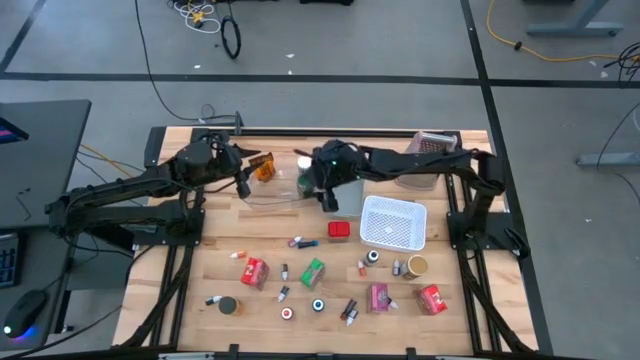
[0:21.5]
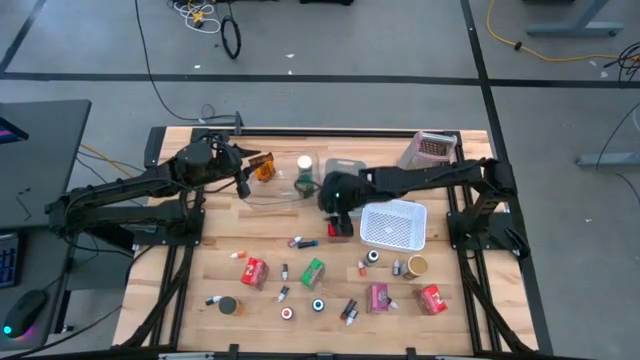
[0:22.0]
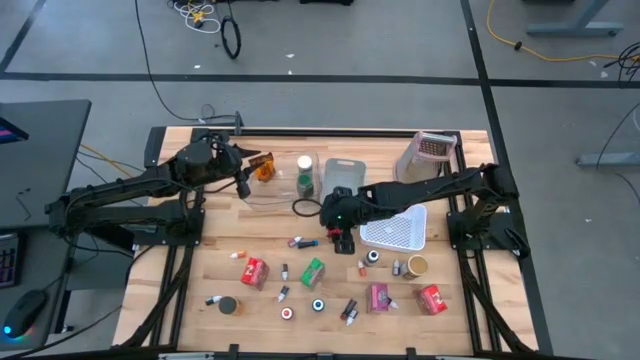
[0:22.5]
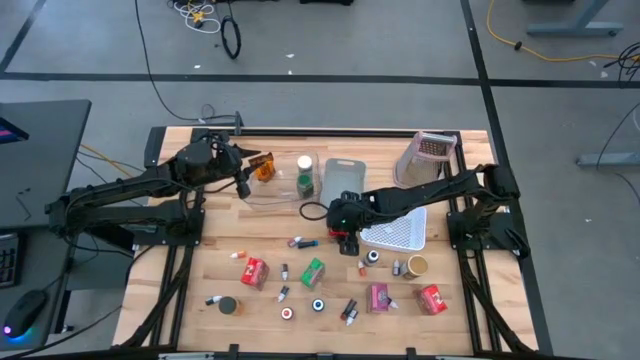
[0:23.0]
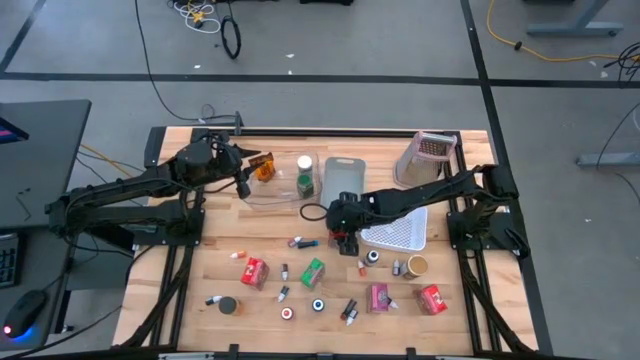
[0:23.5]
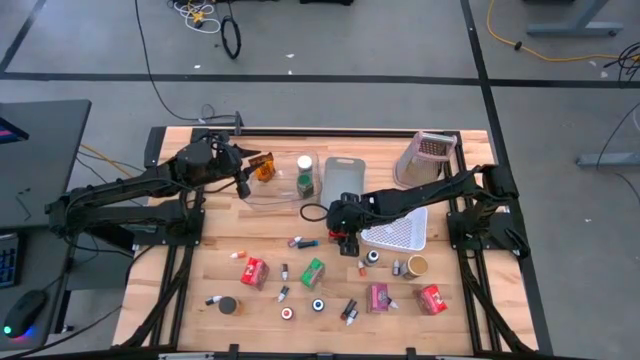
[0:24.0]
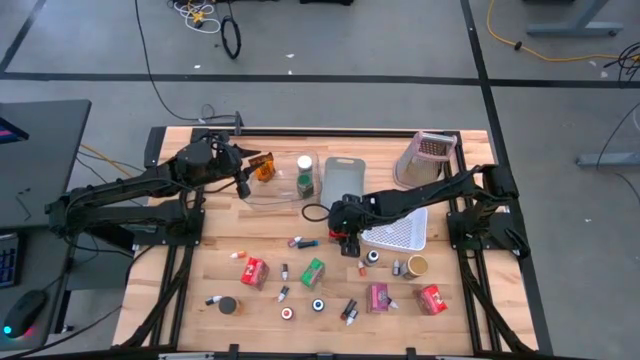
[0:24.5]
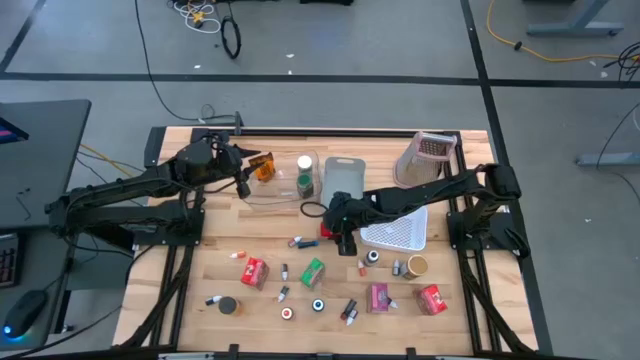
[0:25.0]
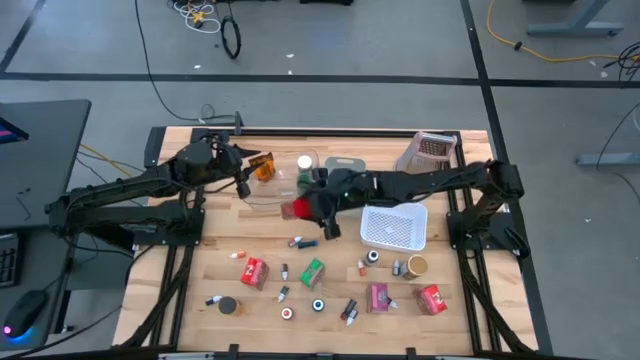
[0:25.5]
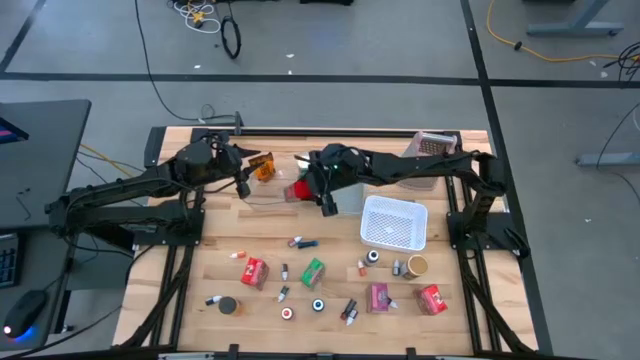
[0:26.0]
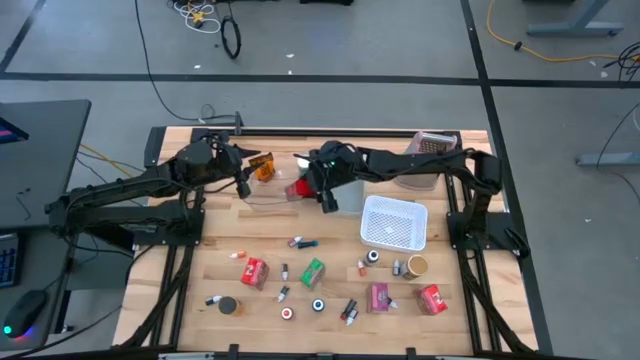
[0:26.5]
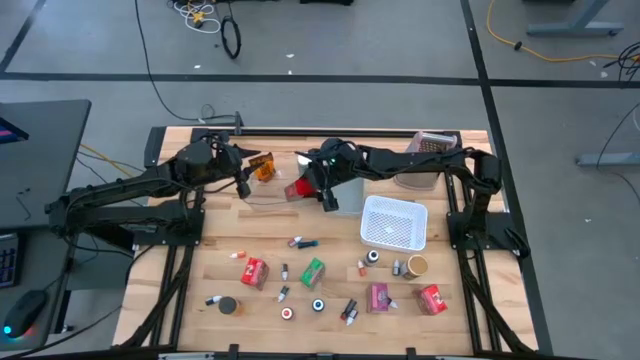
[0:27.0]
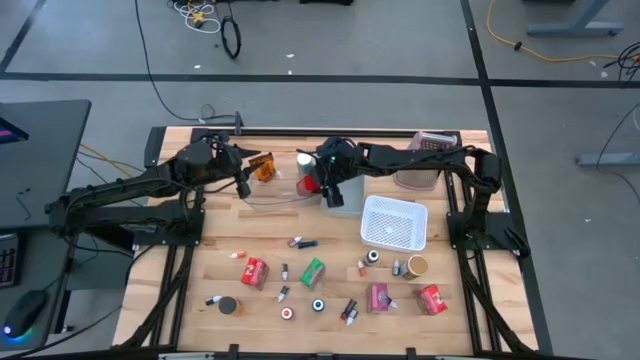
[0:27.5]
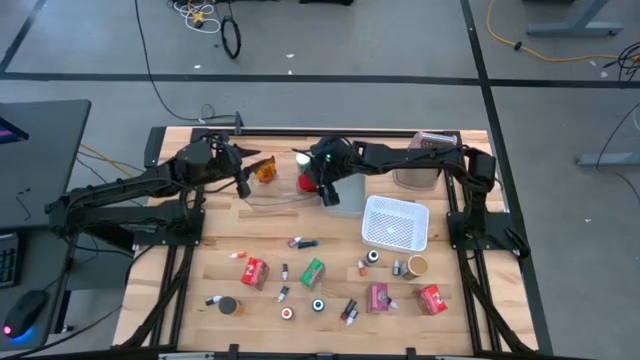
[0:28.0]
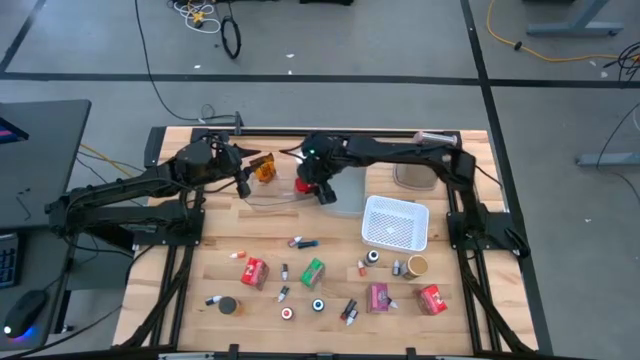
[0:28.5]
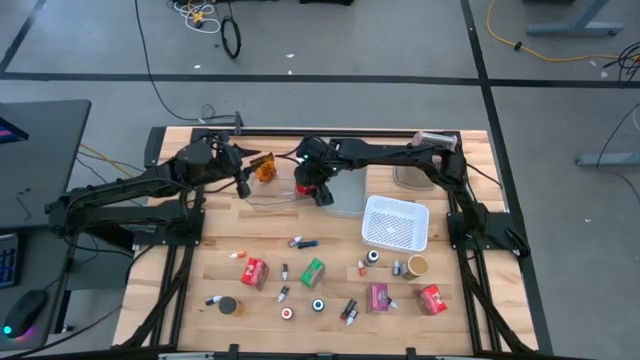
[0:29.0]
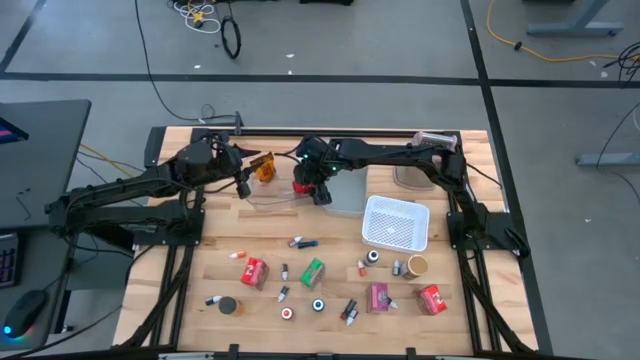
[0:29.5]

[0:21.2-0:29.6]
Task: Pick & Place Kitchen Items
Put the red seasoning can into the transparent bin

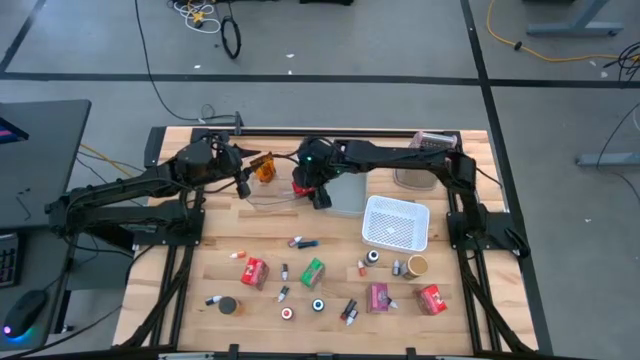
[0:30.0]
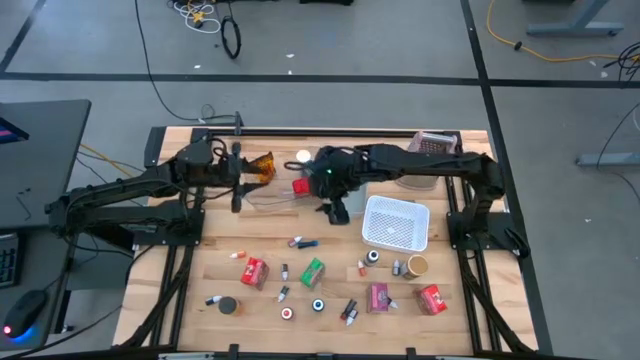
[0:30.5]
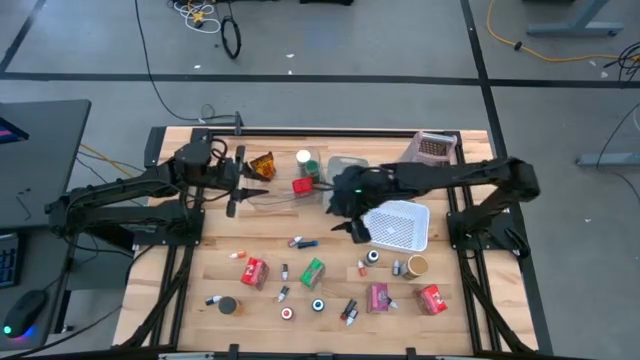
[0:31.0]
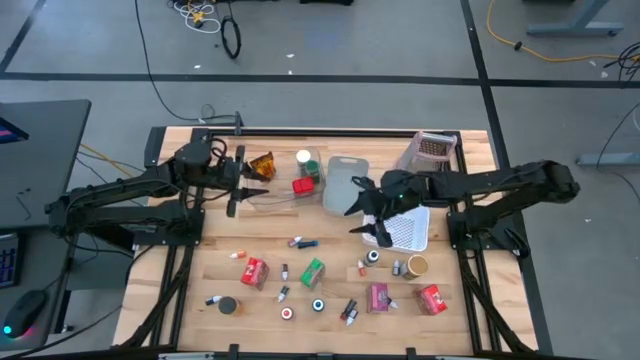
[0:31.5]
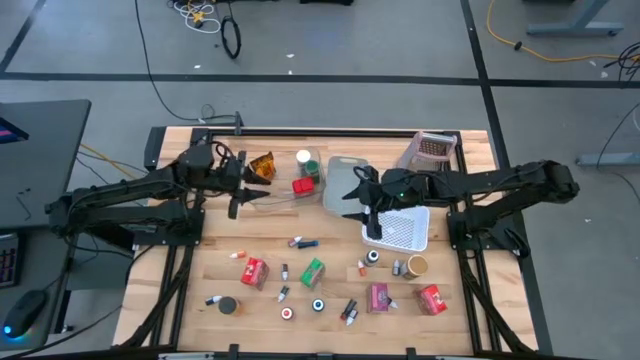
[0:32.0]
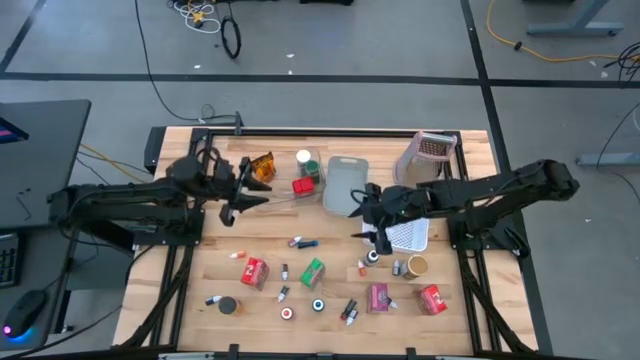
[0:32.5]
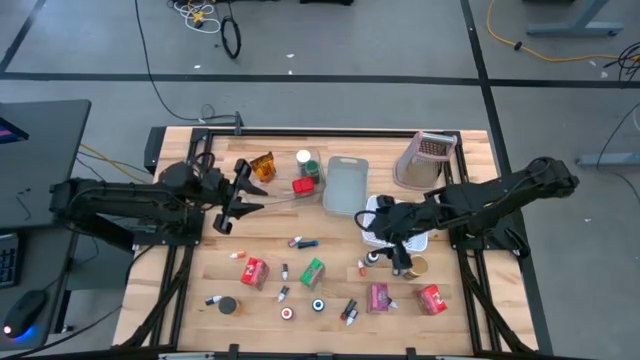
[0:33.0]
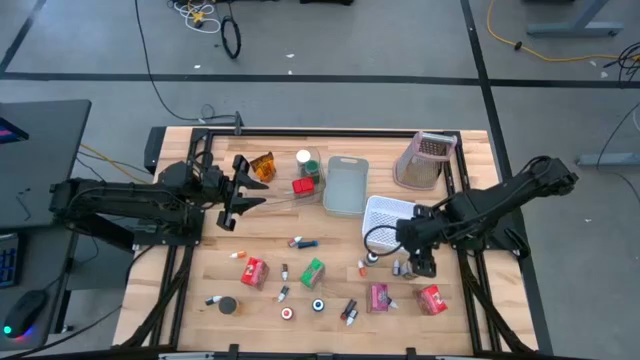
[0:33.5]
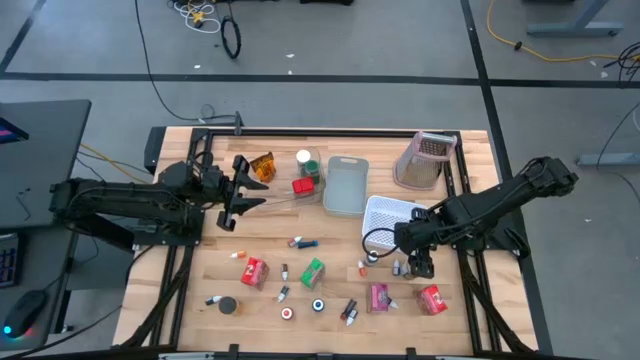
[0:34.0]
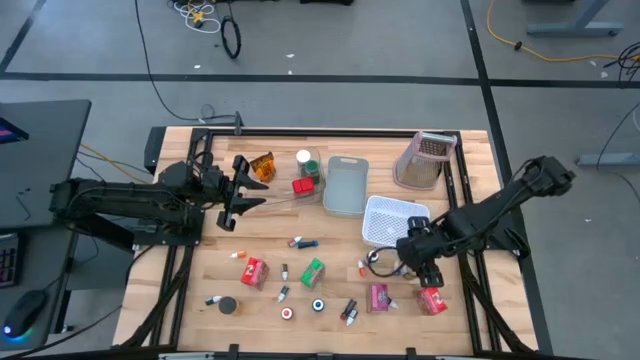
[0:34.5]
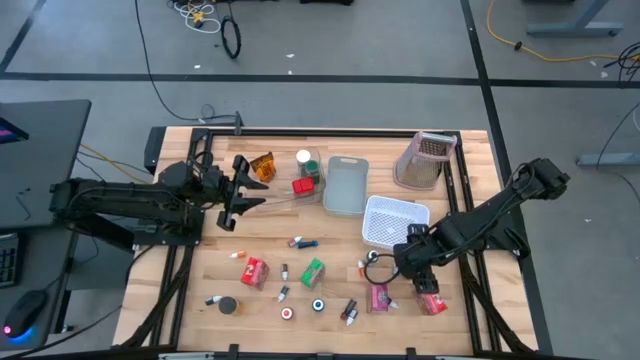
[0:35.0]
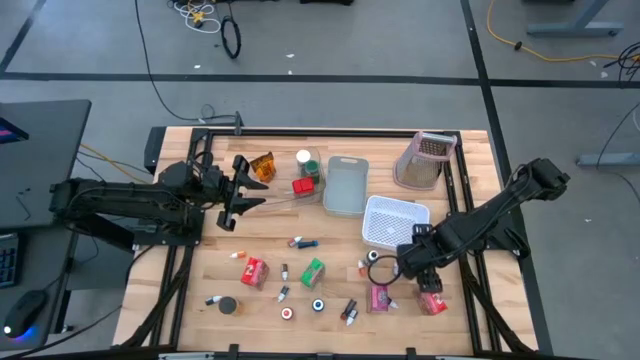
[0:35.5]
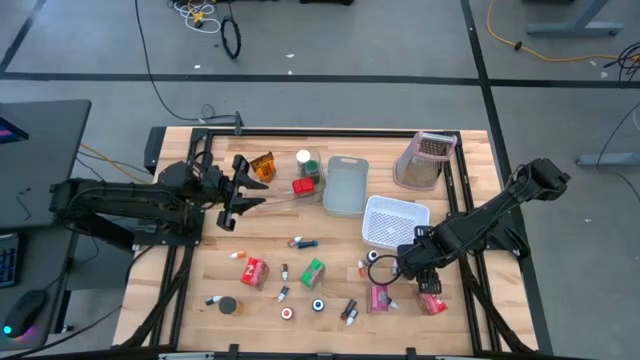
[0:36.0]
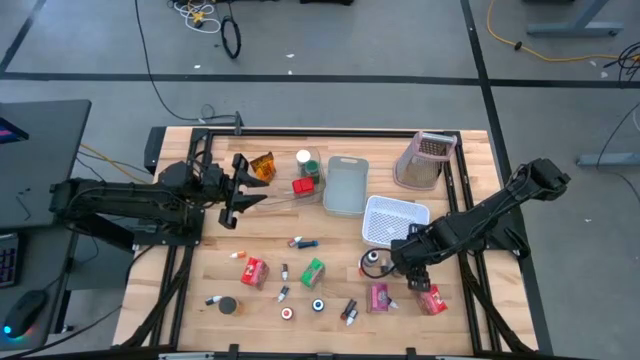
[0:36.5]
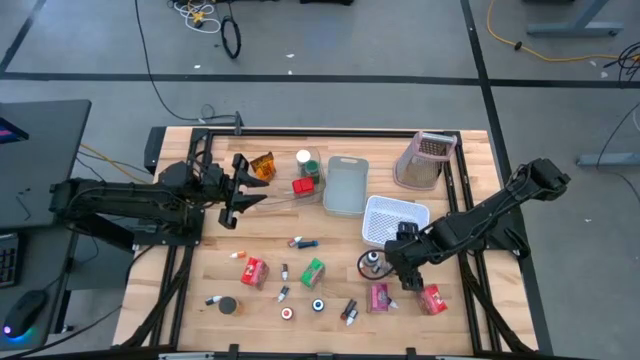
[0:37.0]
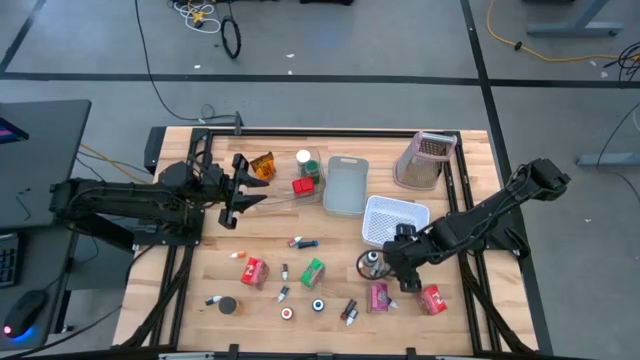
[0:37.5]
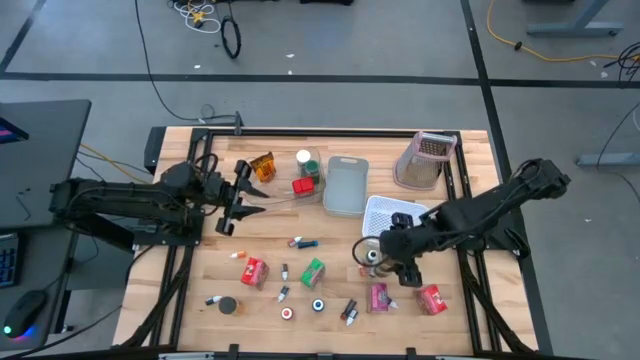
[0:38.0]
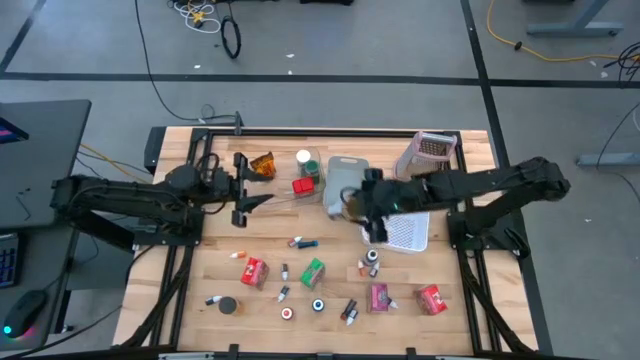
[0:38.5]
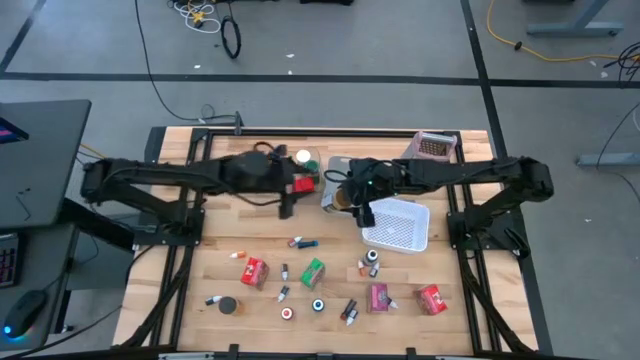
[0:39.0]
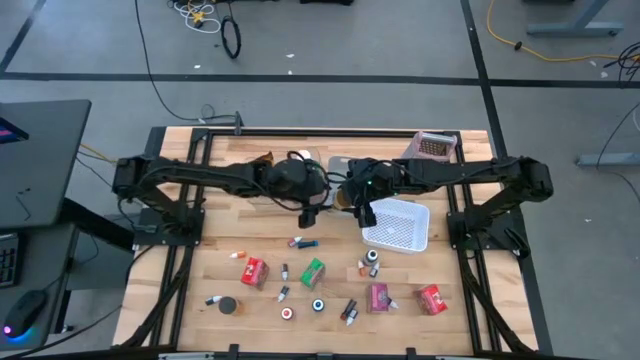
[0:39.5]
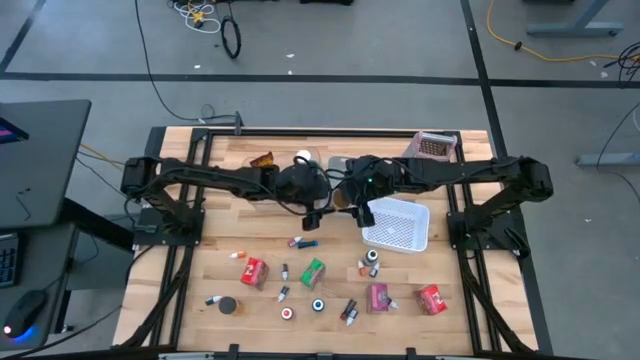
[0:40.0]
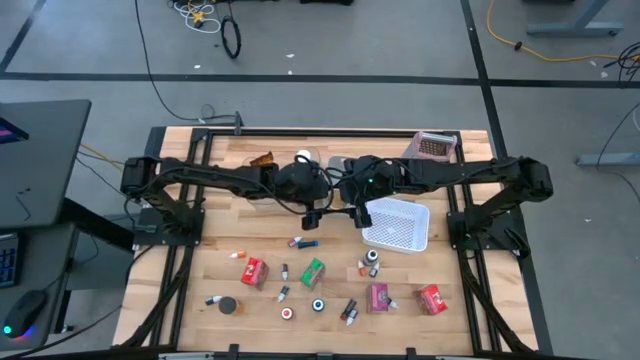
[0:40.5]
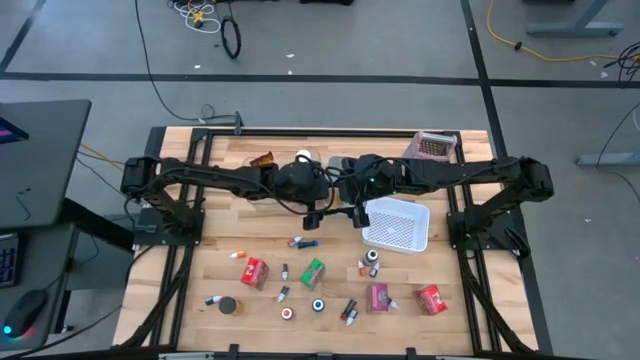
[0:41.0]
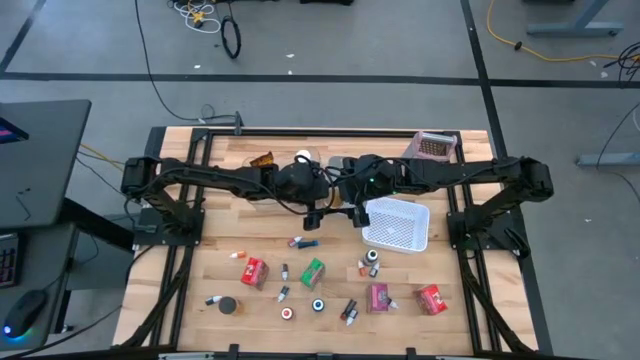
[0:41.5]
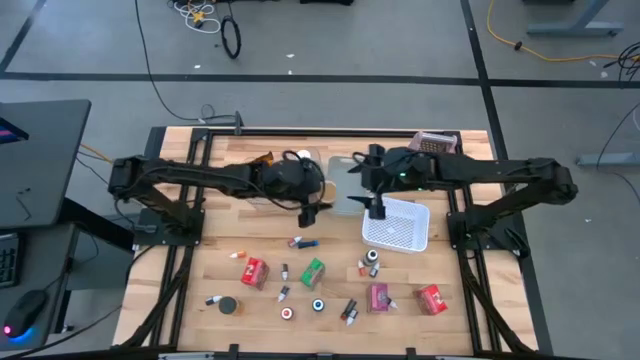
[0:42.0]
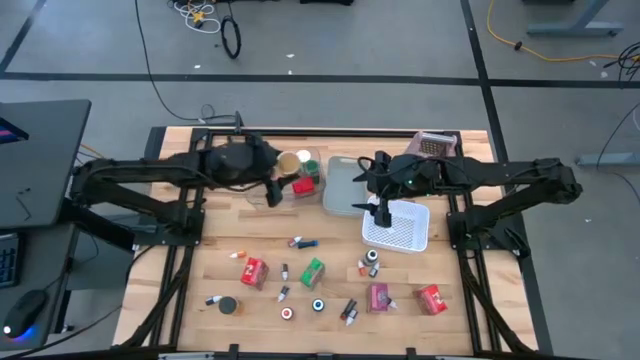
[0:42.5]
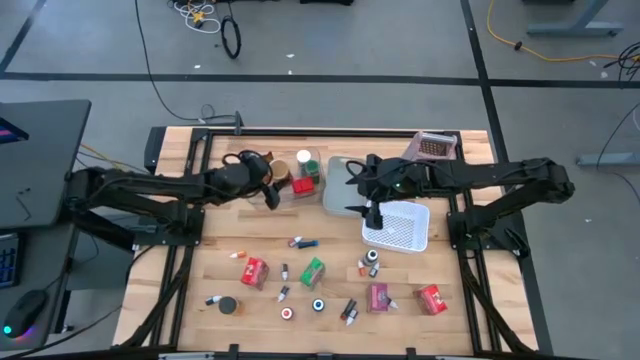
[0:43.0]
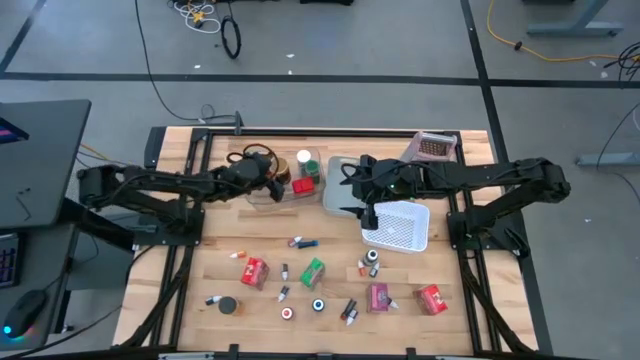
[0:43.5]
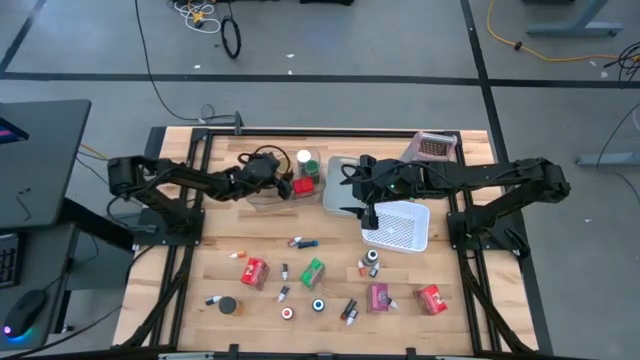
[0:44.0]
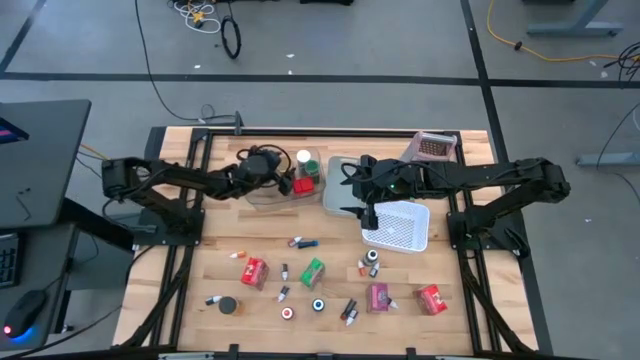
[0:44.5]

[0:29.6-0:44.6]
Put the golden seasoning bottle into the transparent bin
